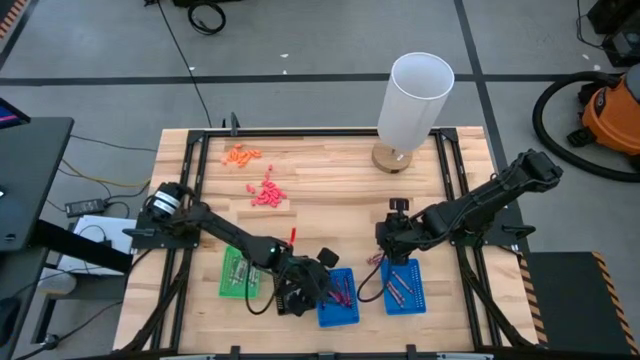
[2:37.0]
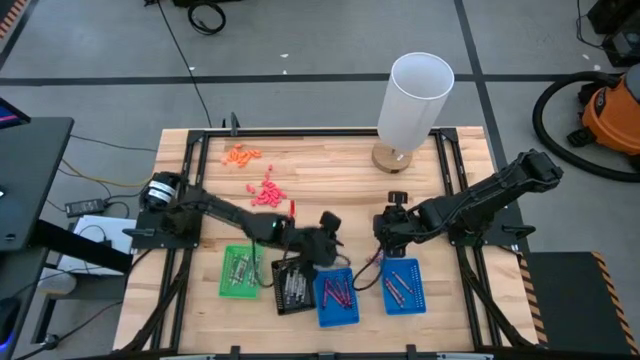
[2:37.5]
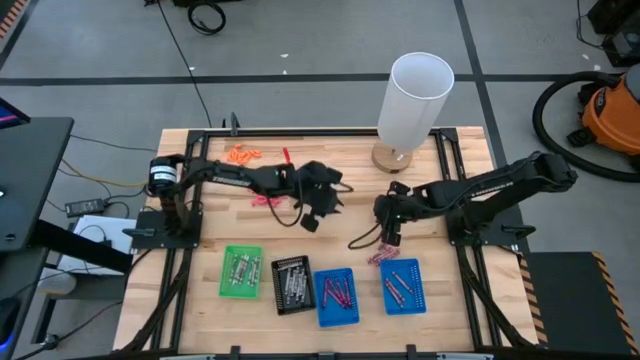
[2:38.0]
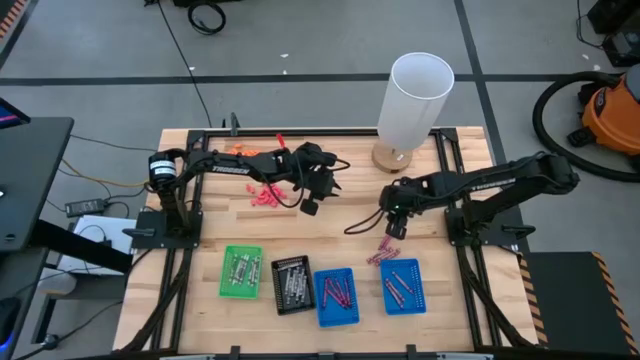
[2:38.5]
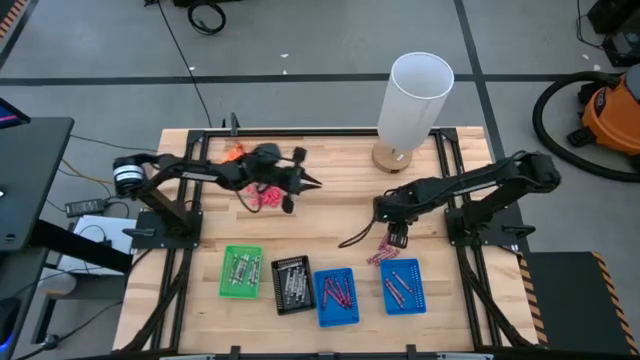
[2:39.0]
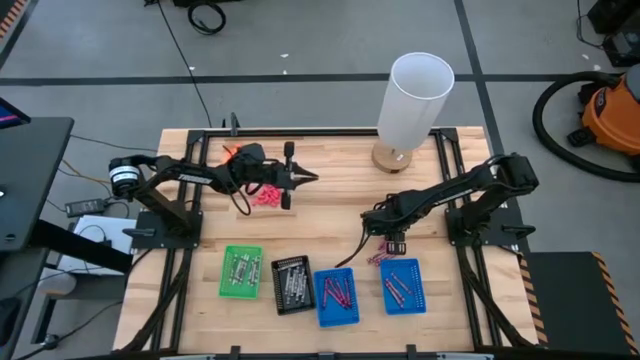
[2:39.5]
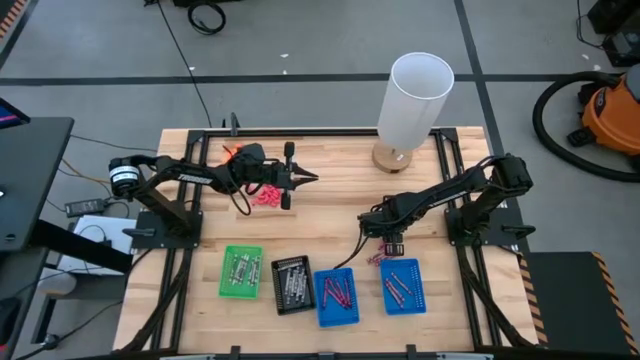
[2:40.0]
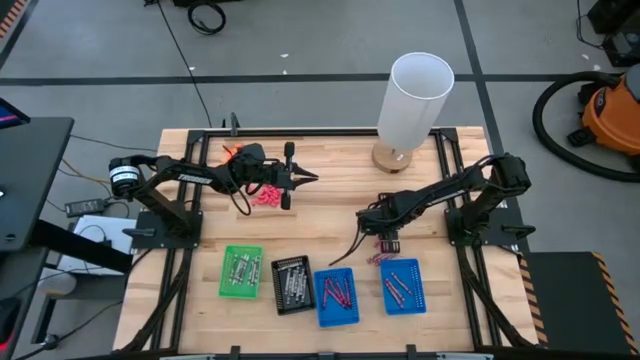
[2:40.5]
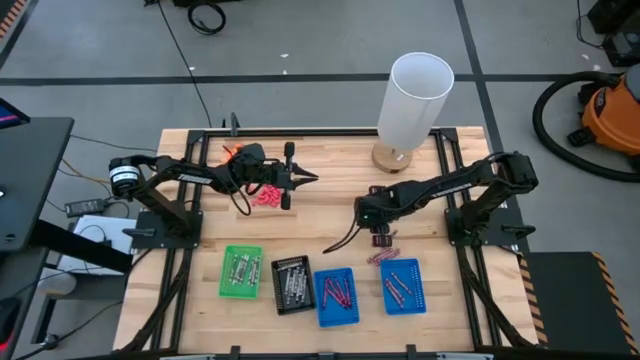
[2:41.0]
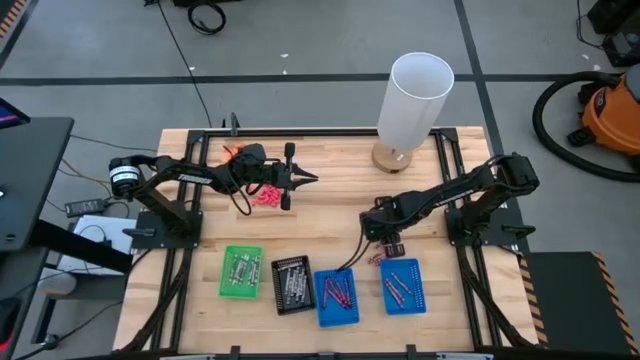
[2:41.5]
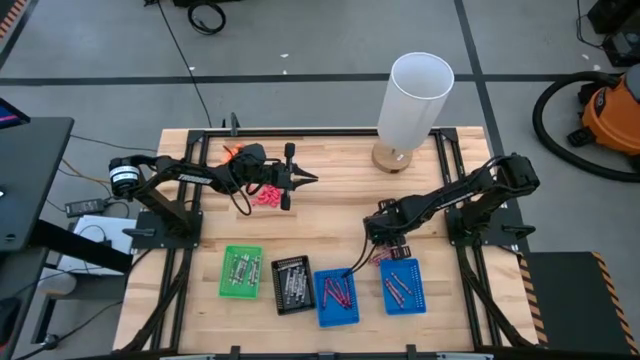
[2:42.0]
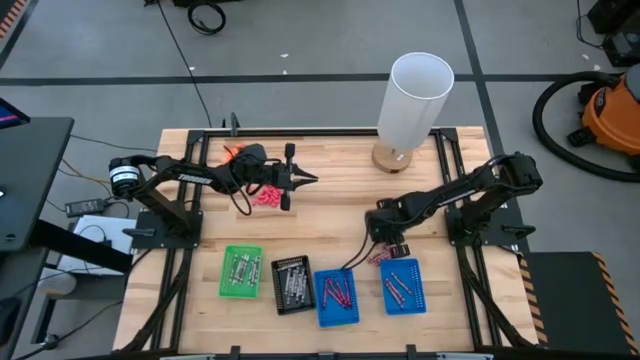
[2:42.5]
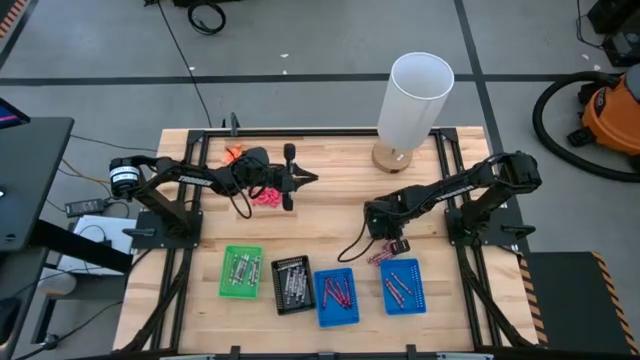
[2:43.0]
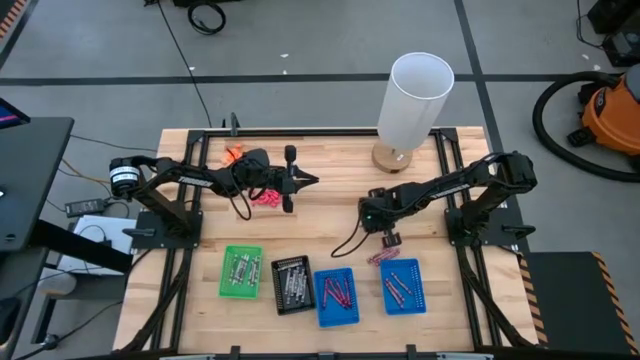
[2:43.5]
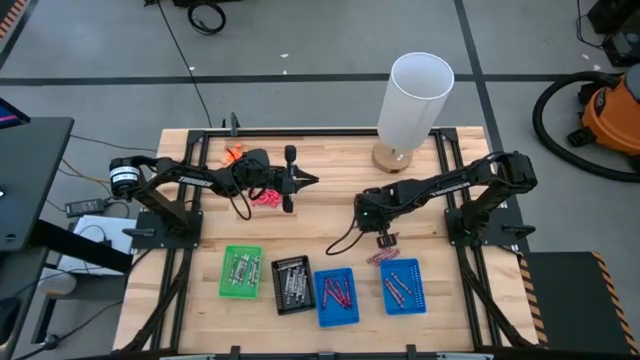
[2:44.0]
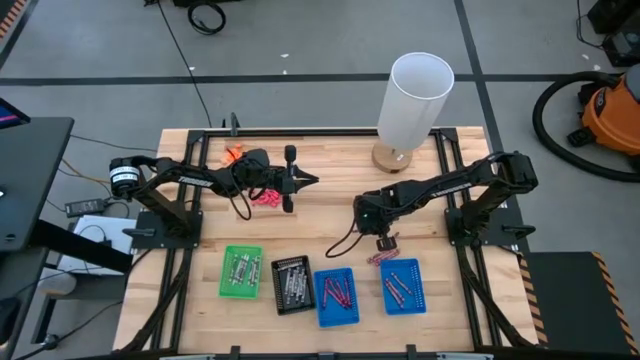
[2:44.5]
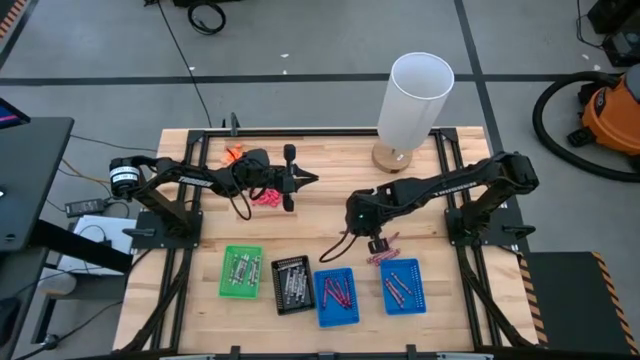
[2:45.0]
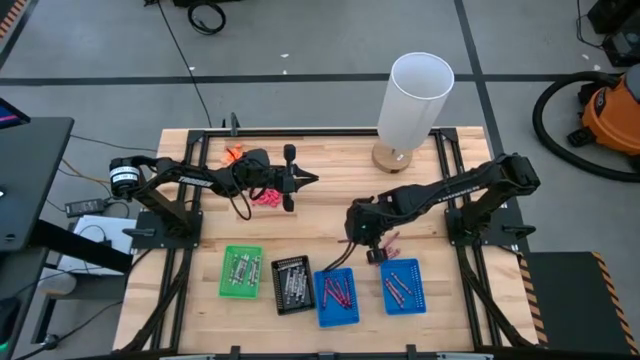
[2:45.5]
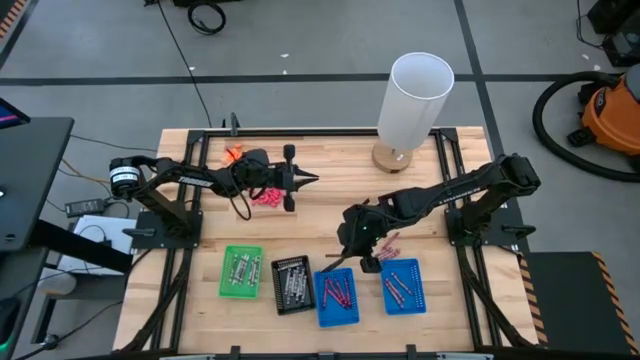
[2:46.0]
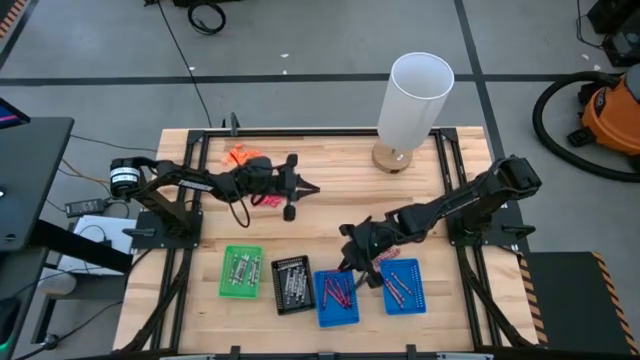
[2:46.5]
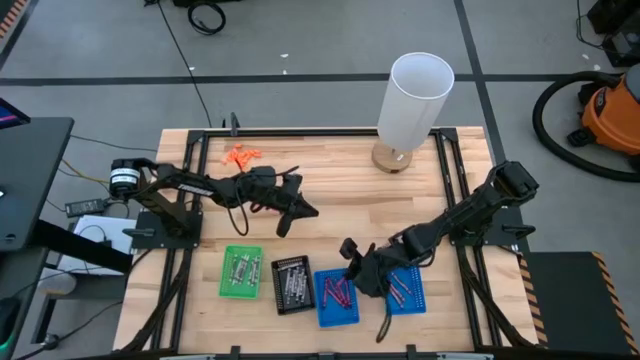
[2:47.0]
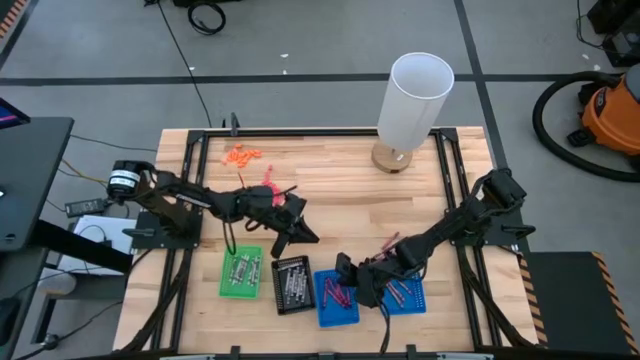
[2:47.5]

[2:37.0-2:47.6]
Task: Sort crayons
Put the red crayon into the left blue bin

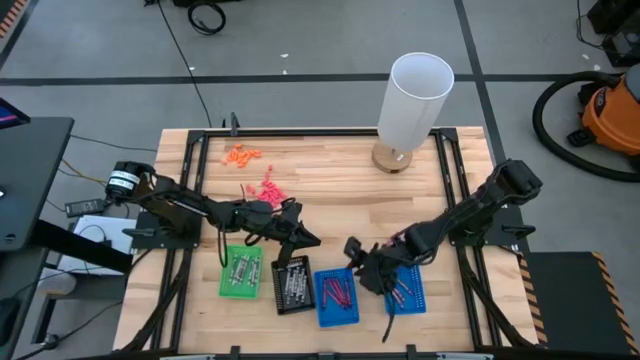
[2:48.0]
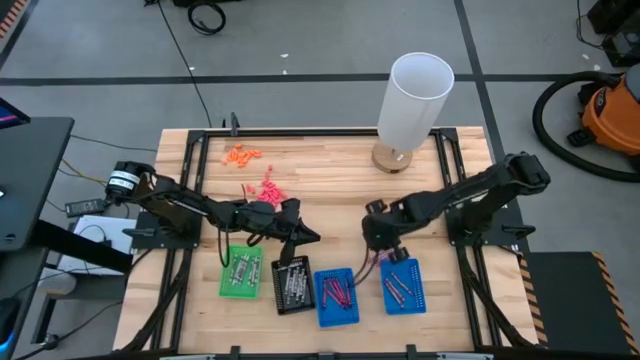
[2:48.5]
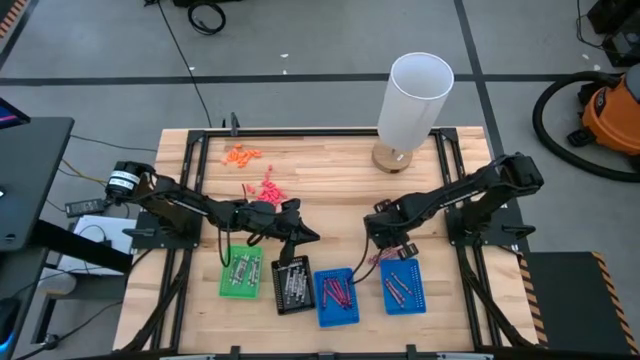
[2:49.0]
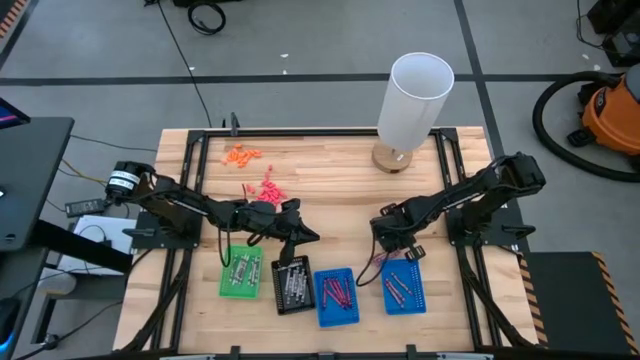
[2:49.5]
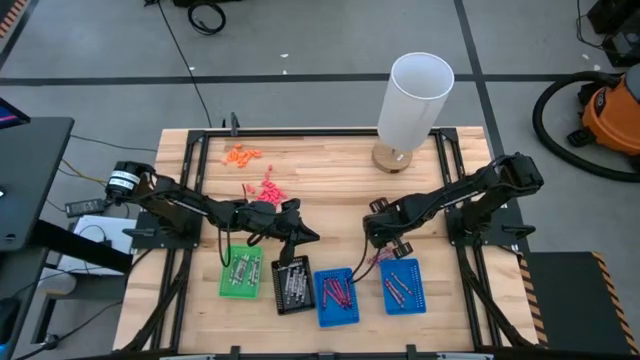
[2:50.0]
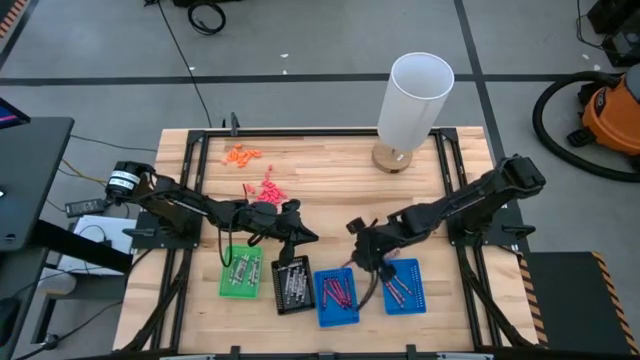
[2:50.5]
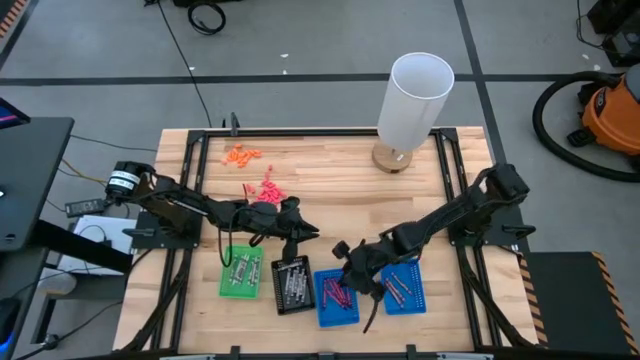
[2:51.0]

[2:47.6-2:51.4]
Put the red crayon into the left blue bin

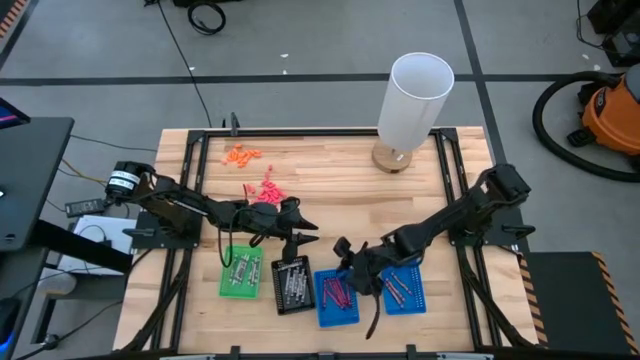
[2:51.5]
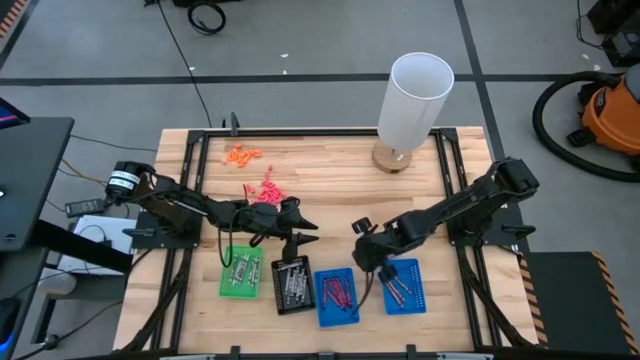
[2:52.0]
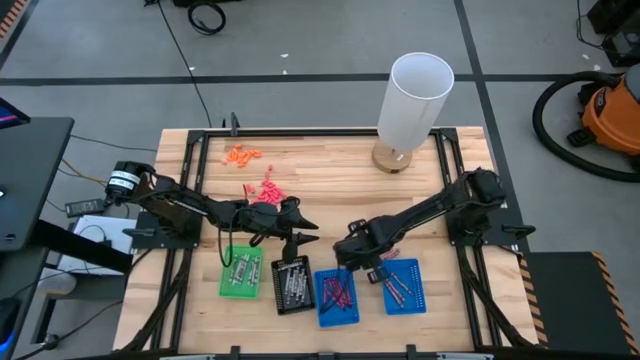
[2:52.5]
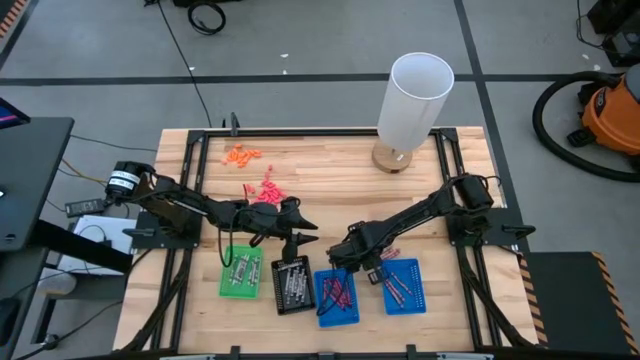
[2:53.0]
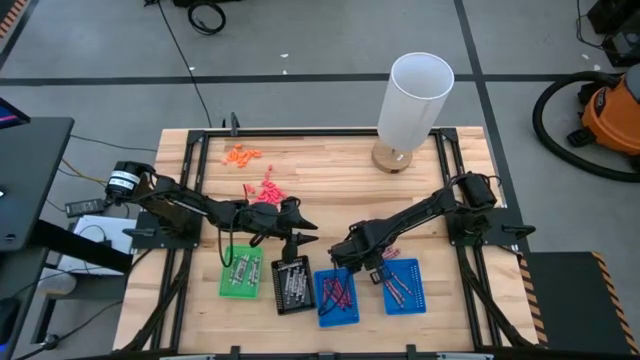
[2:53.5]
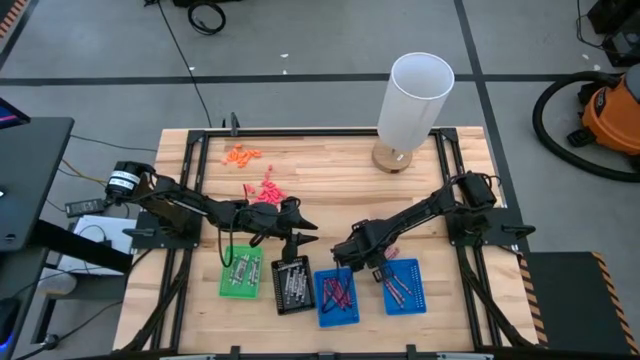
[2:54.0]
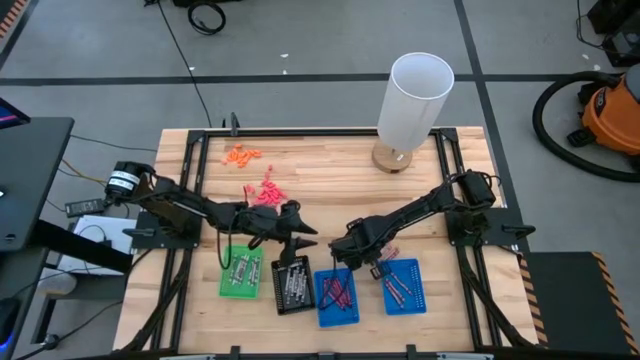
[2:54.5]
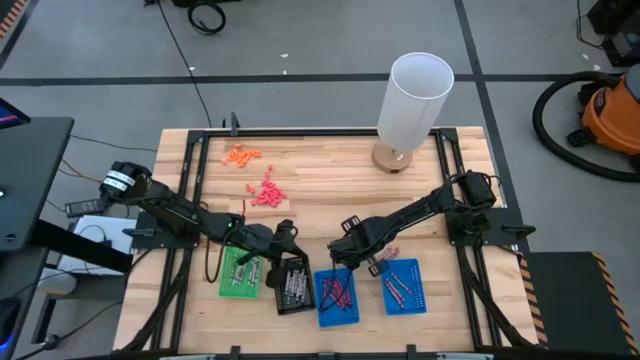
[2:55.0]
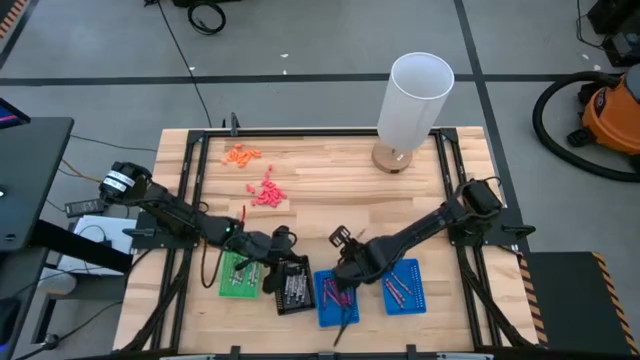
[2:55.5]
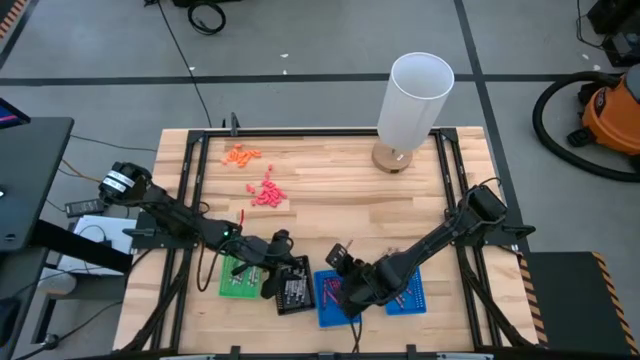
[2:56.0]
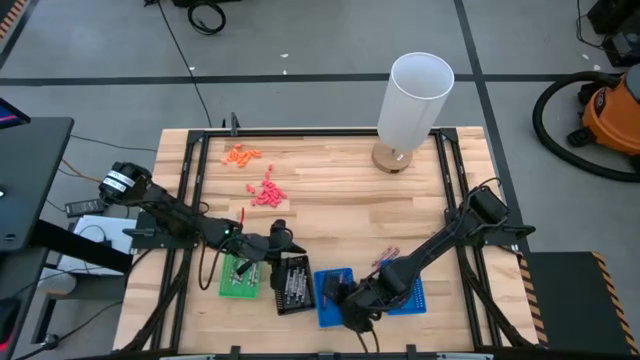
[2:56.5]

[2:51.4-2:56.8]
Put the pink crayon into the right blue bin

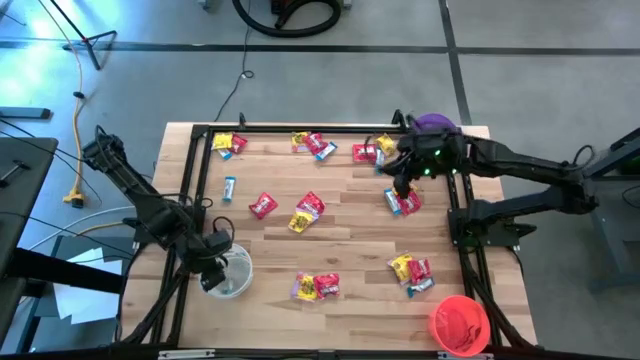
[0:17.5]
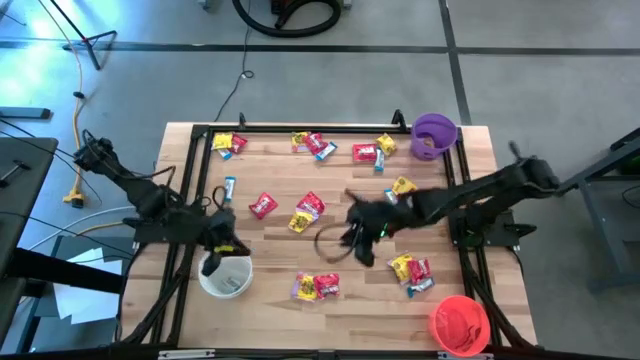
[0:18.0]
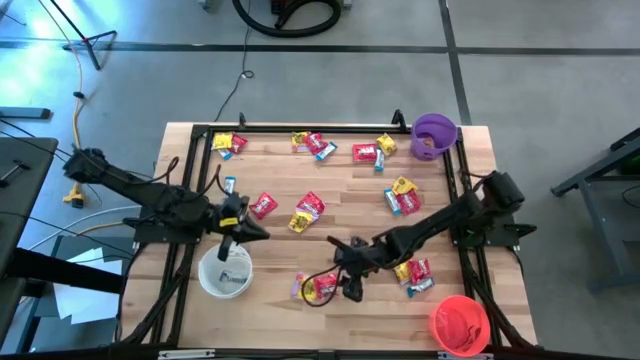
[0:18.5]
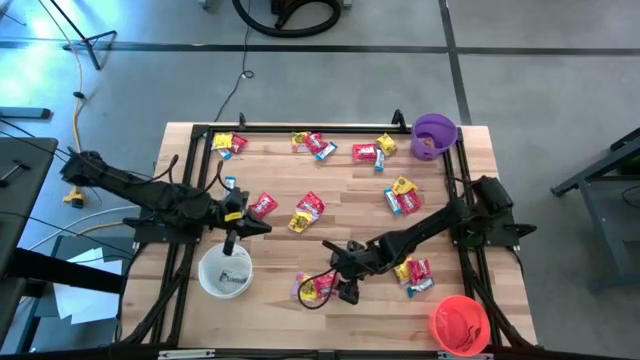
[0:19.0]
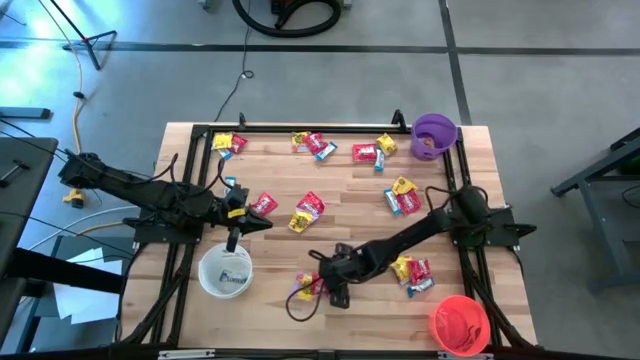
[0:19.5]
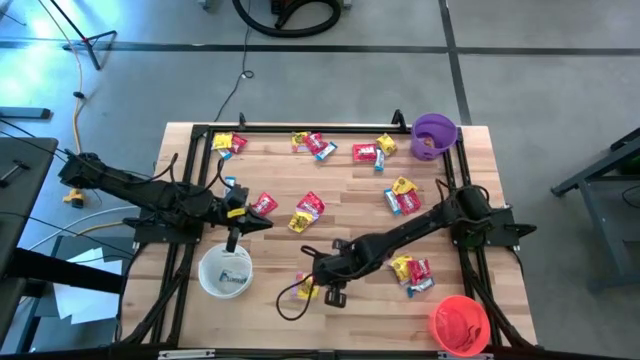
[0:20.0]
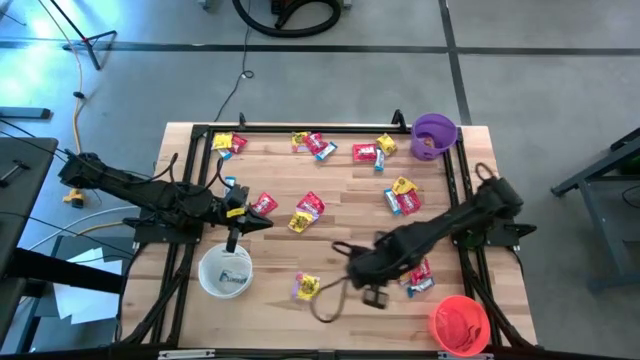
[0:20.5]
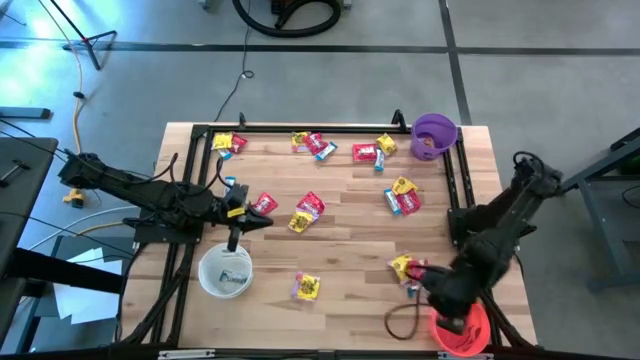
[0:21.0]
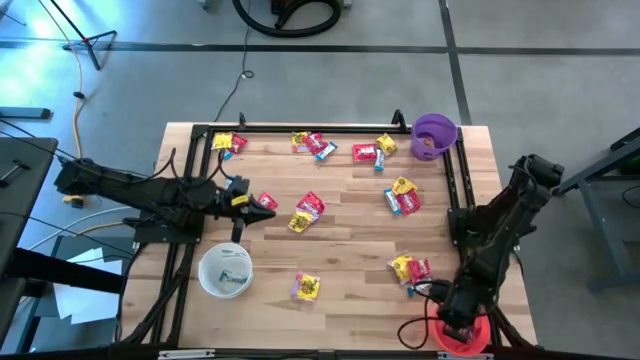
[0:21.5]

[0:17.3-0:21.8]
Task: Sort candy
Put the red candy into the orange bin
